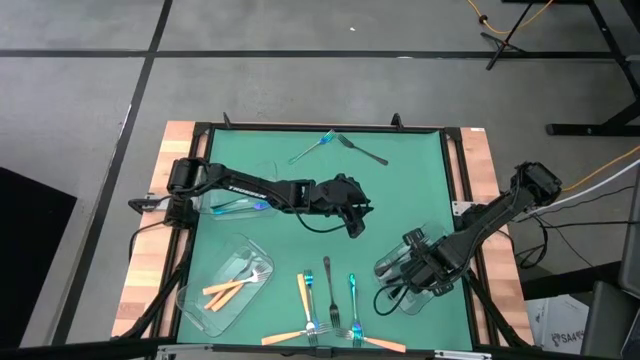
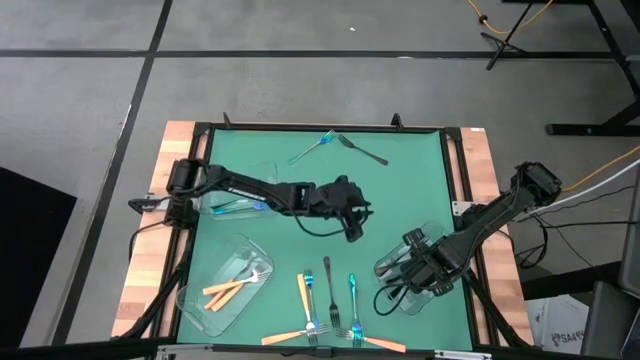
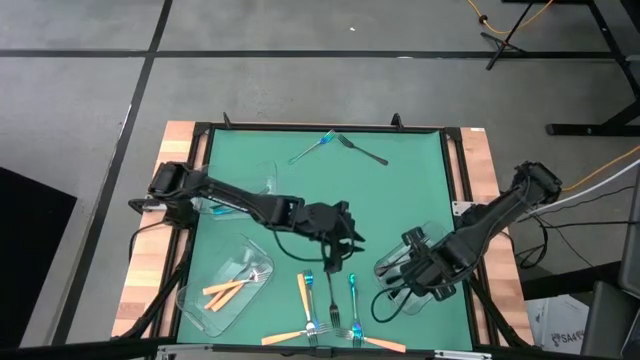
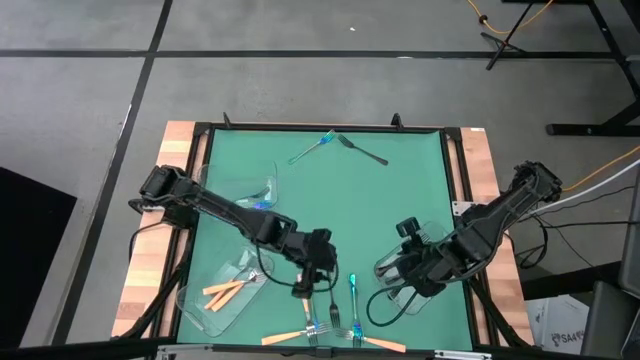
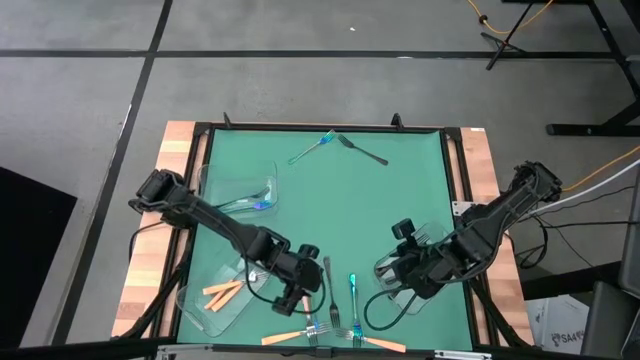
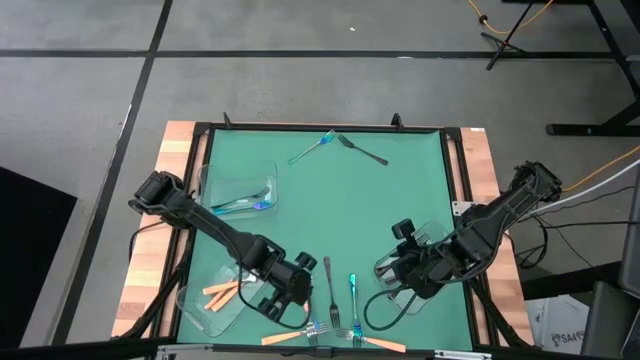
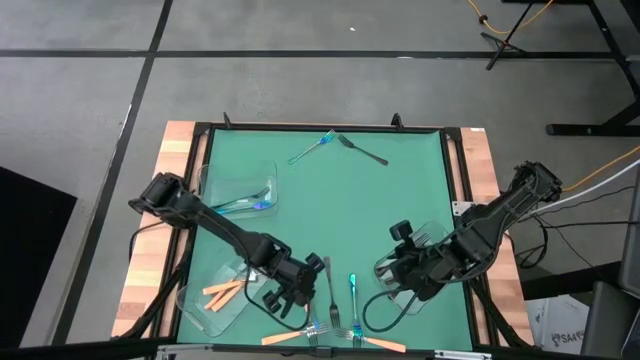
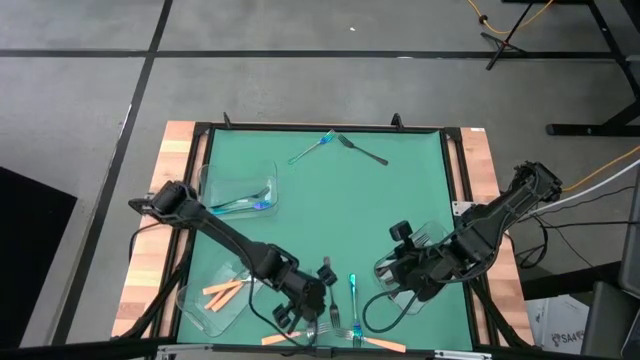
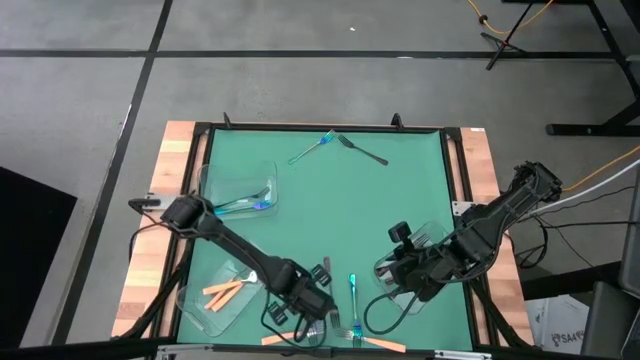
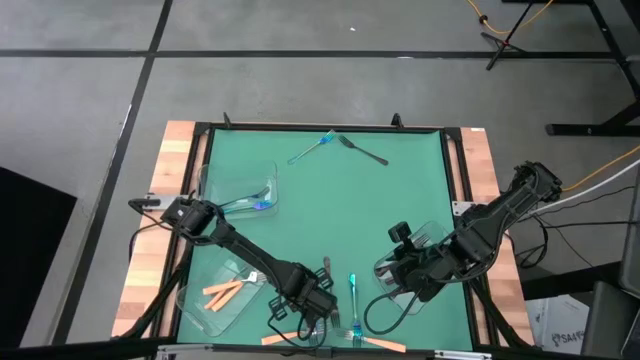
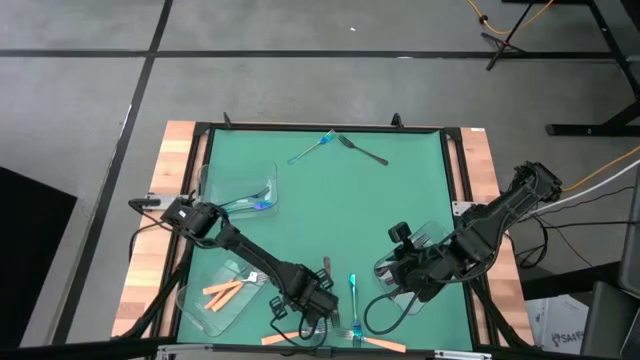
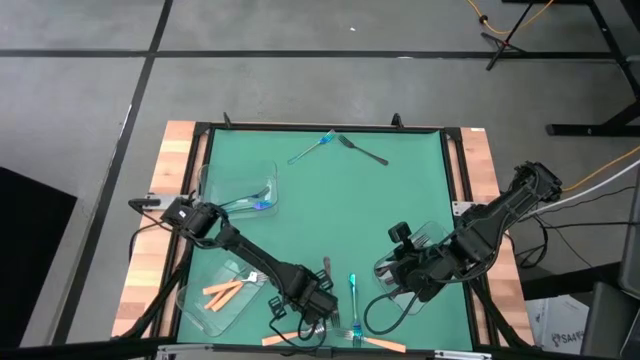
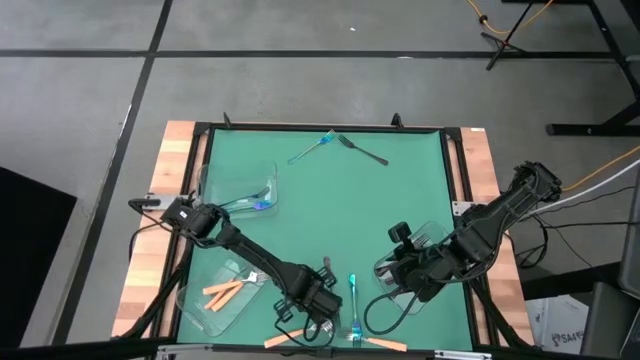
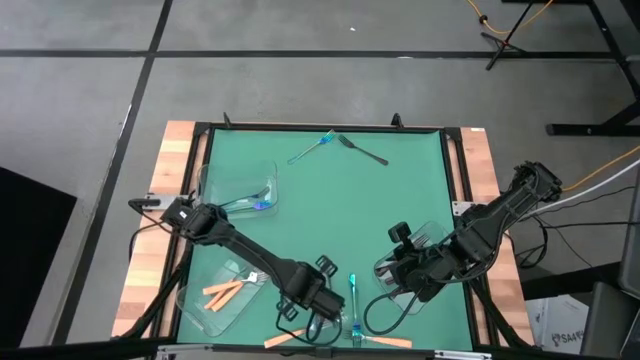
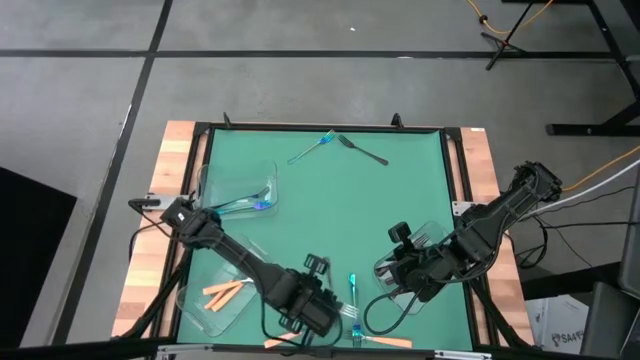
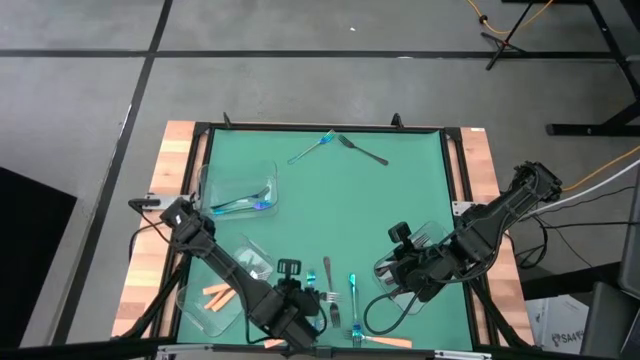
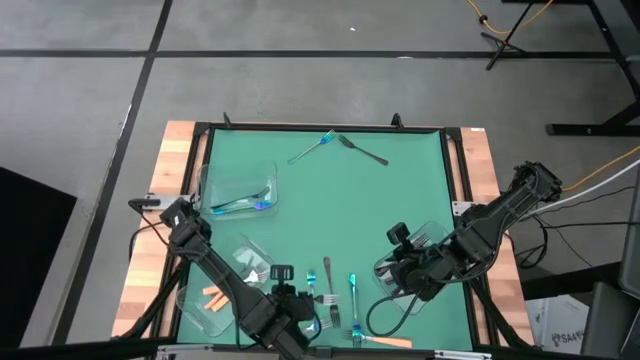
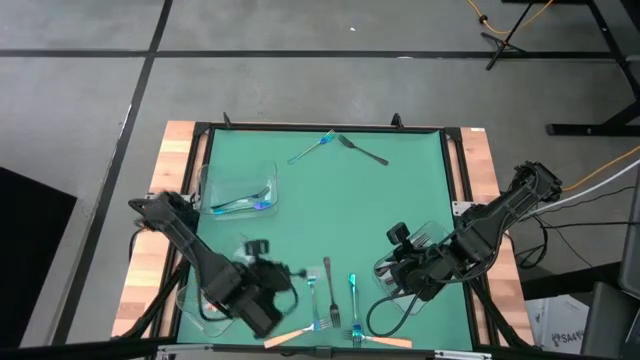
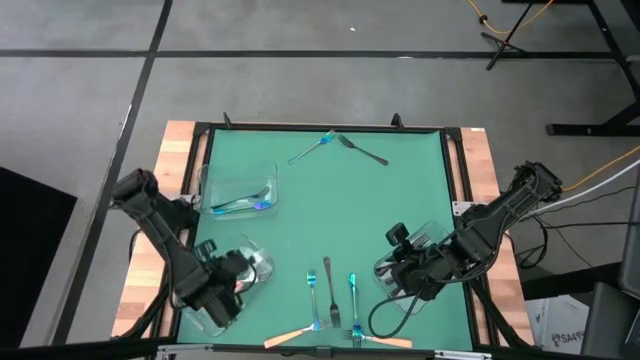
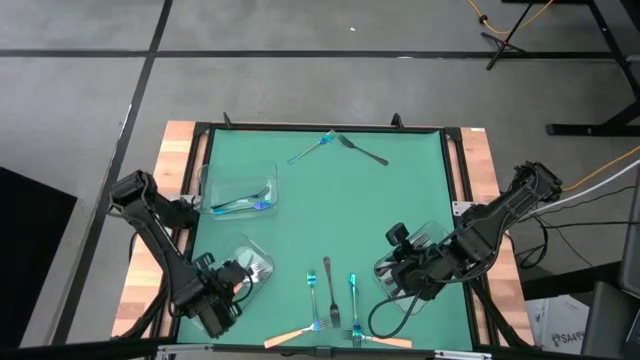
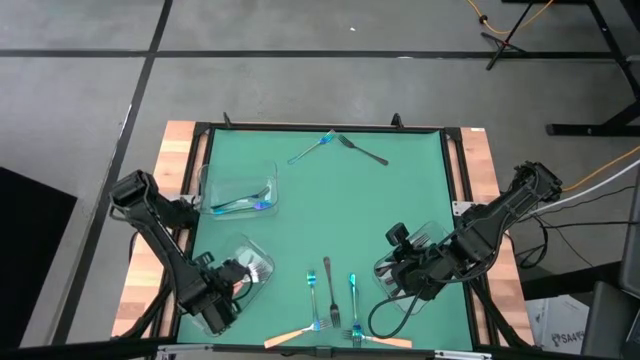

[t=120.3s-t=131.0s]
Task: Sort silverware by color (type)
Put the top yellow fork into the bottom left transparent bin

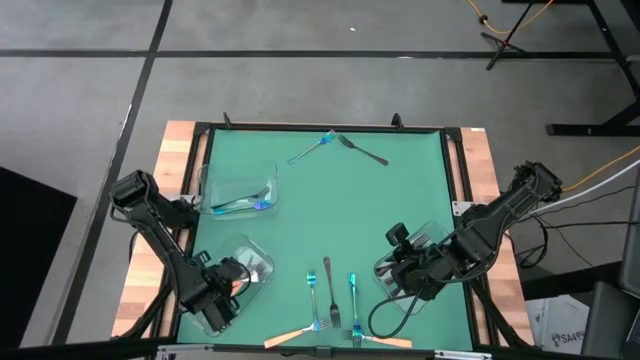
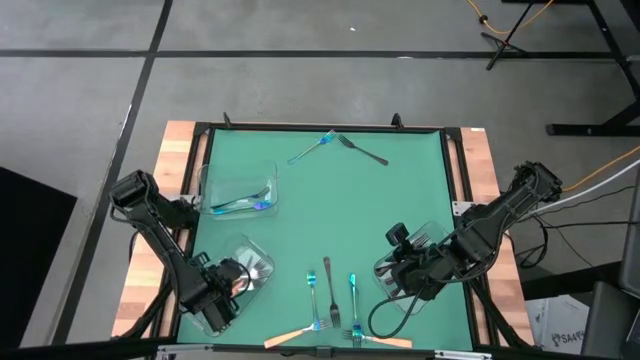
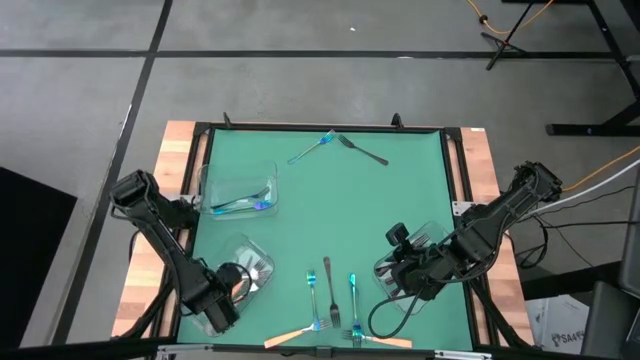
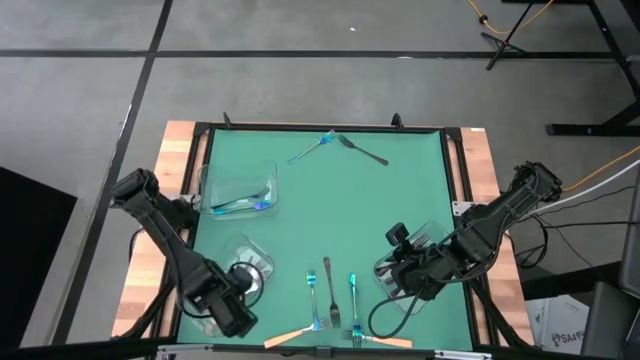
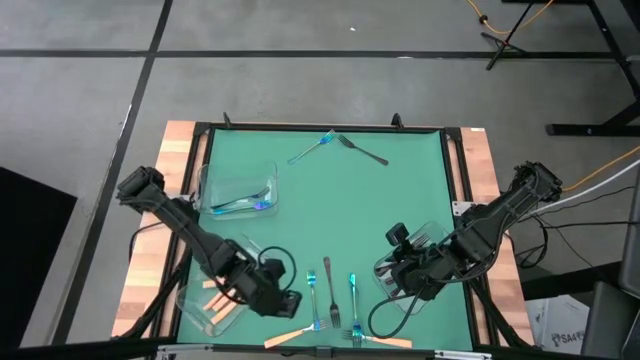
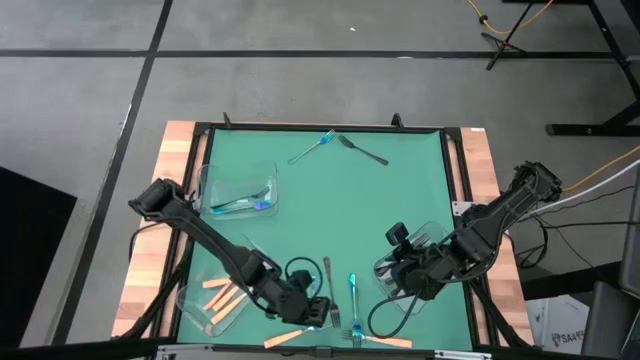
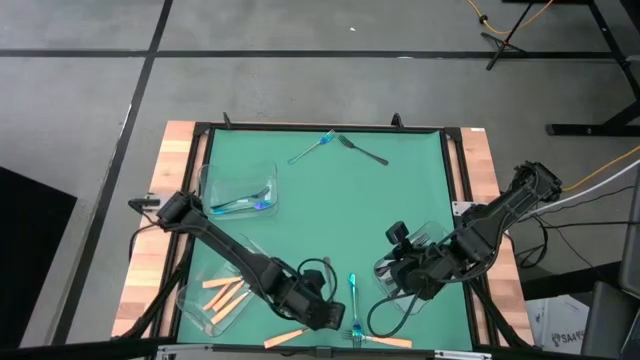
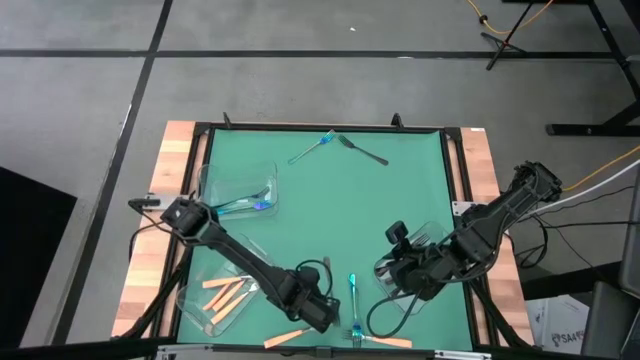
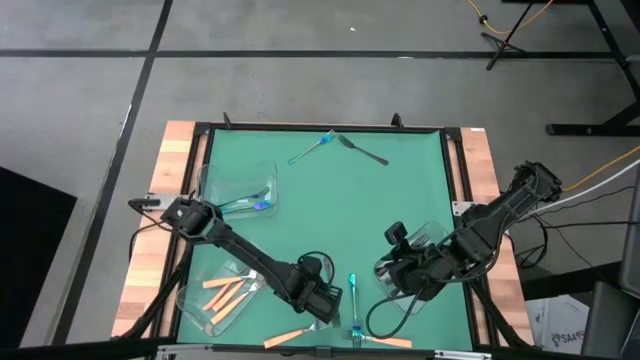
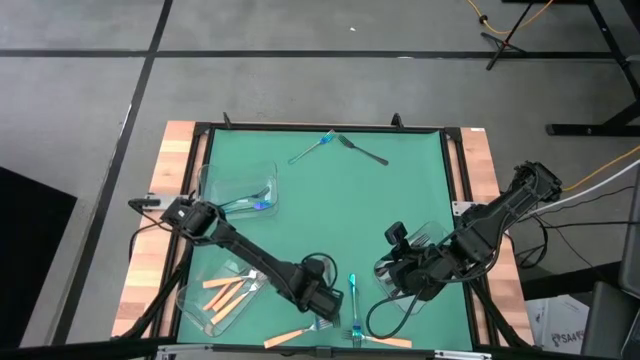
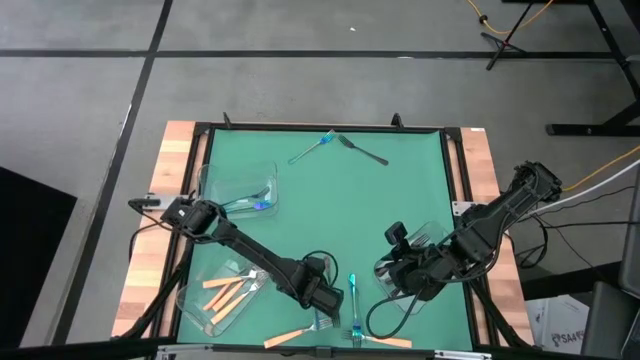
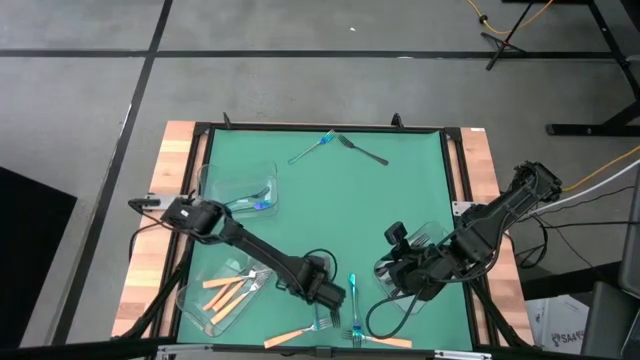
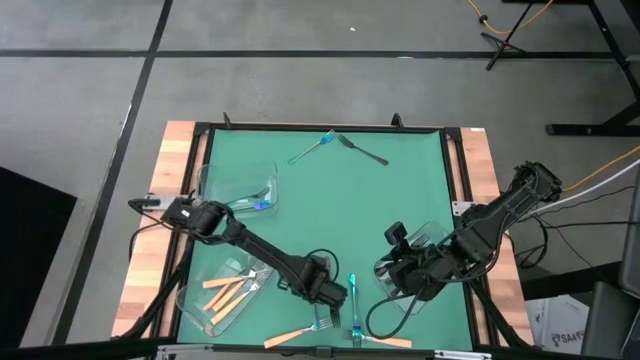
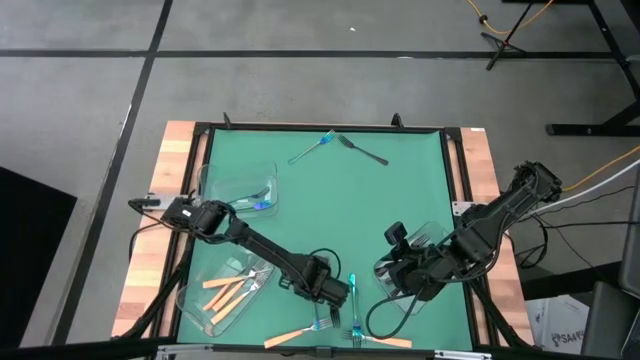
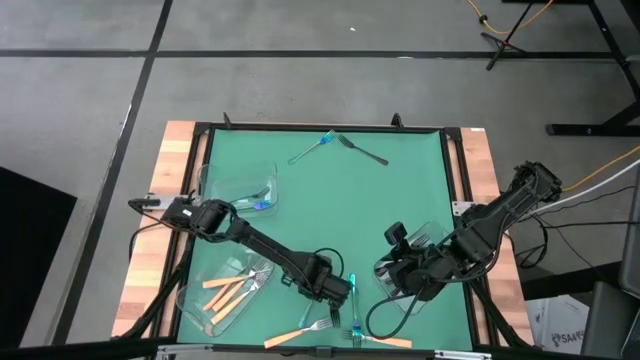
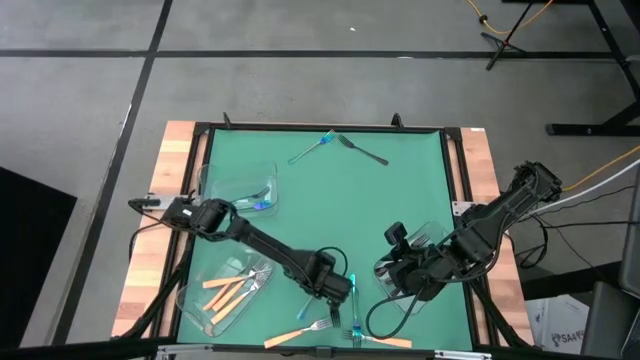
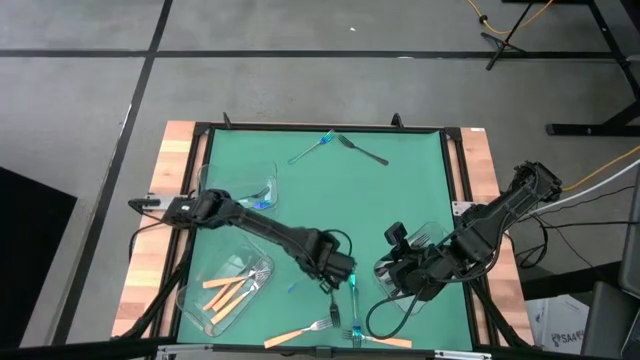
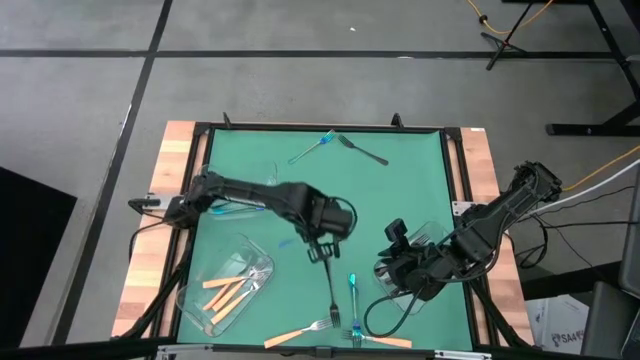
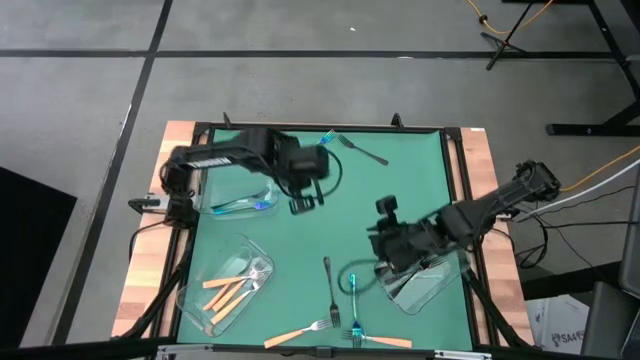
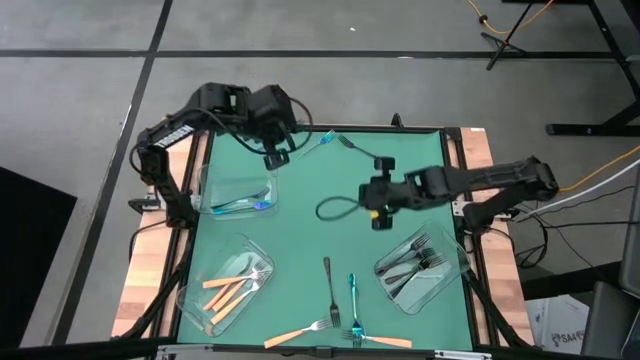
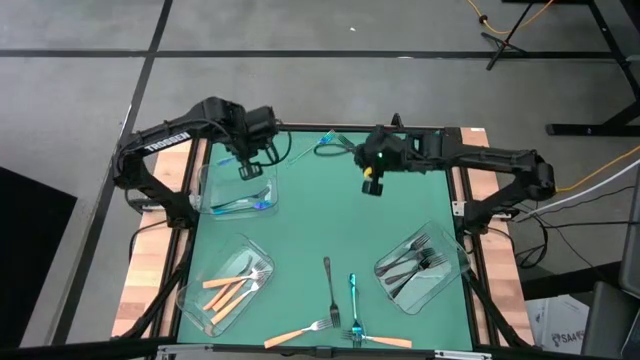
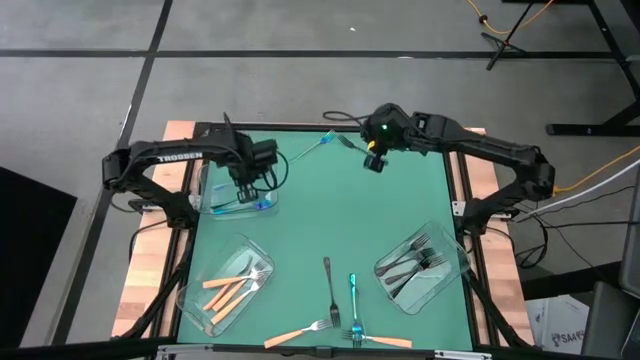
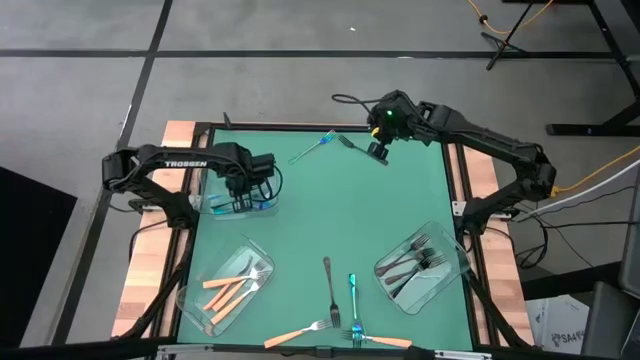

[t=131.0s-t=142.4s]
Put the blue fork into the top transparent bin
